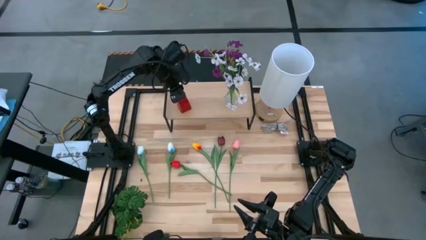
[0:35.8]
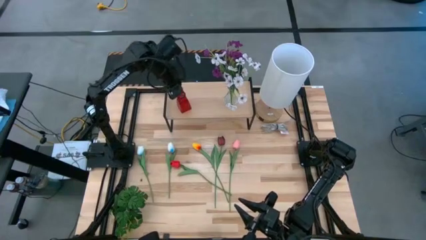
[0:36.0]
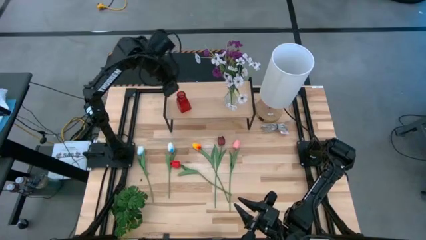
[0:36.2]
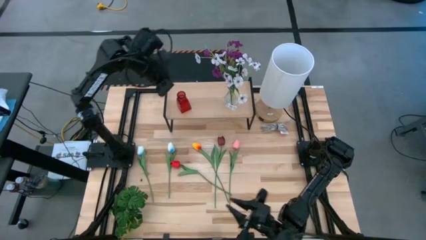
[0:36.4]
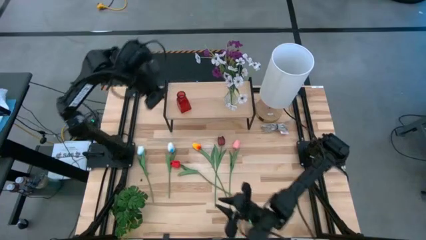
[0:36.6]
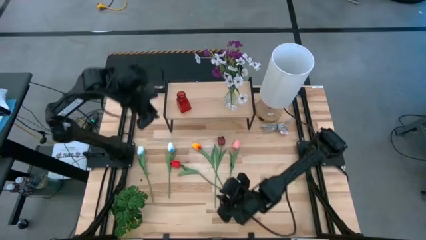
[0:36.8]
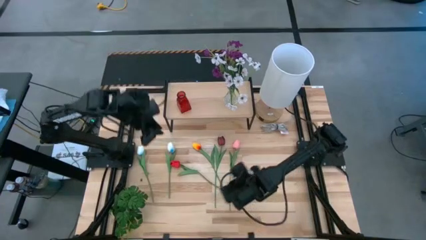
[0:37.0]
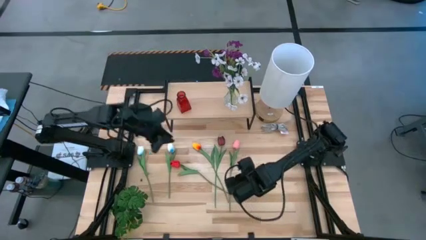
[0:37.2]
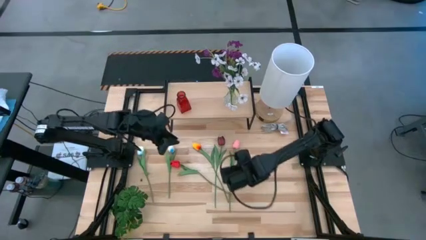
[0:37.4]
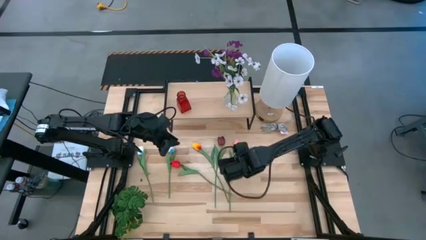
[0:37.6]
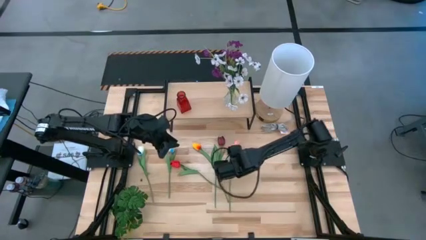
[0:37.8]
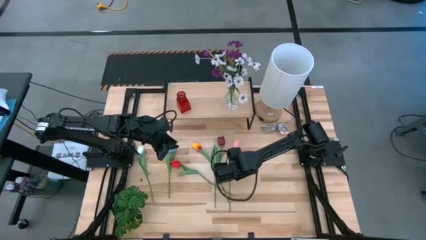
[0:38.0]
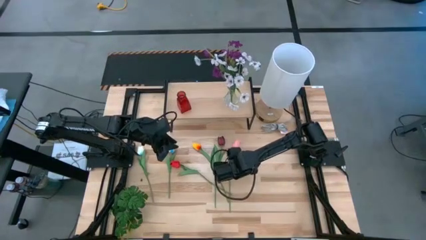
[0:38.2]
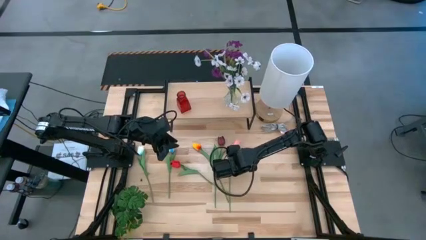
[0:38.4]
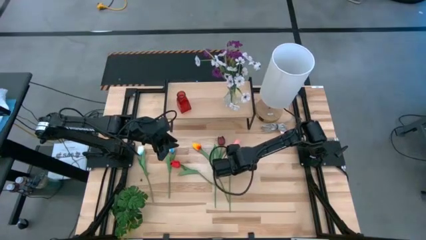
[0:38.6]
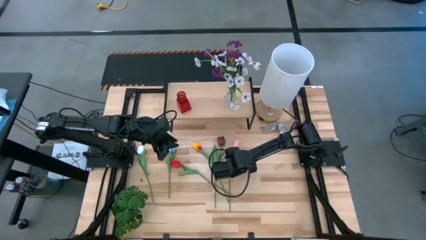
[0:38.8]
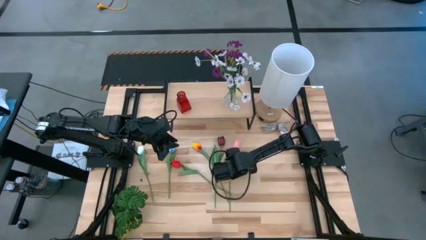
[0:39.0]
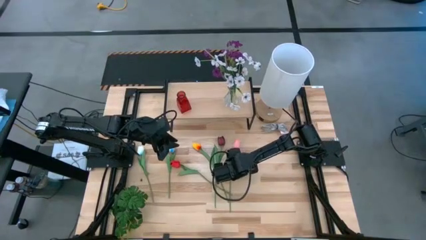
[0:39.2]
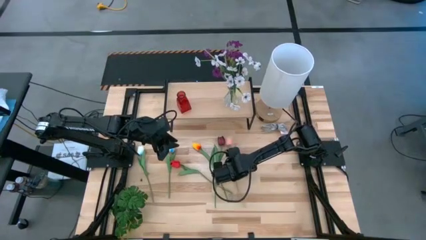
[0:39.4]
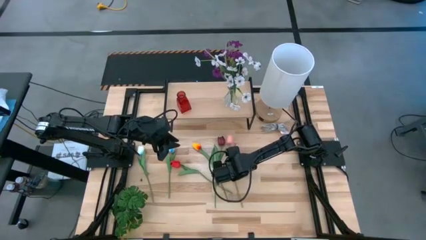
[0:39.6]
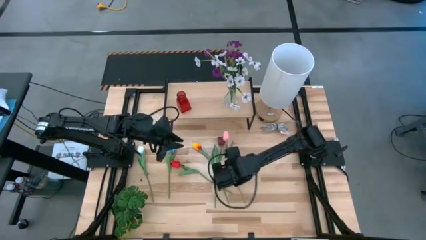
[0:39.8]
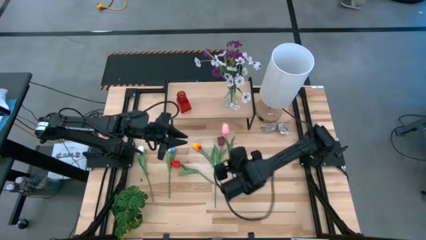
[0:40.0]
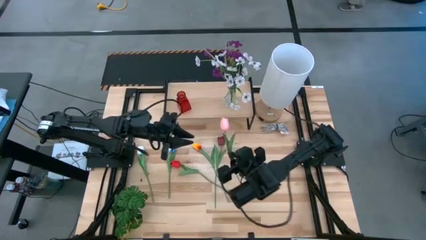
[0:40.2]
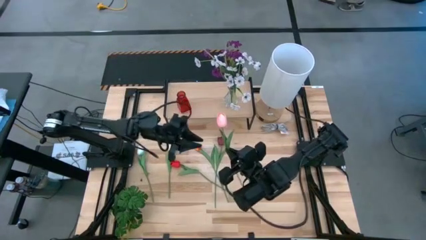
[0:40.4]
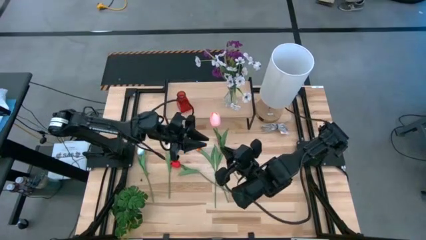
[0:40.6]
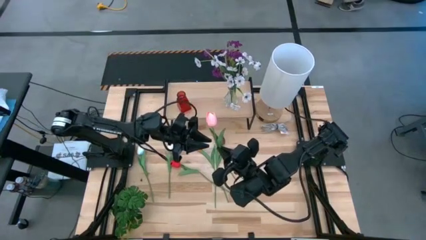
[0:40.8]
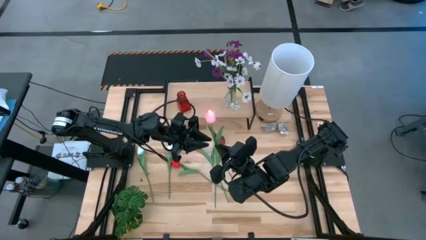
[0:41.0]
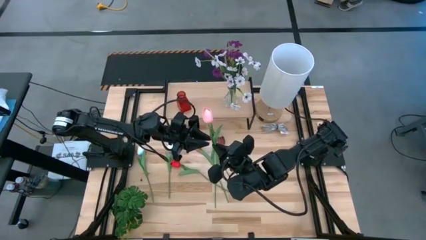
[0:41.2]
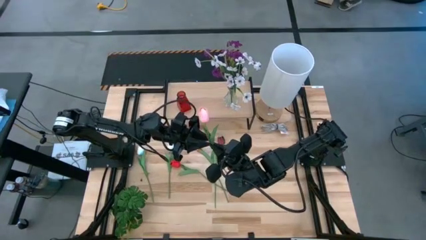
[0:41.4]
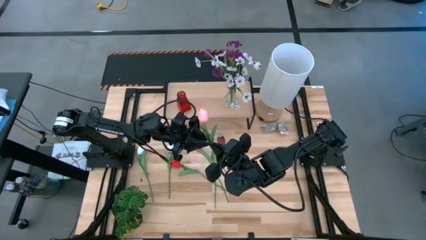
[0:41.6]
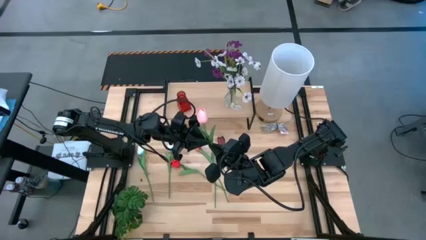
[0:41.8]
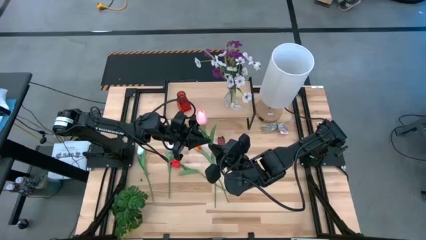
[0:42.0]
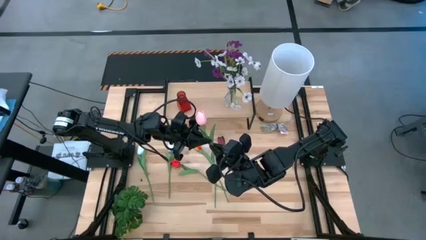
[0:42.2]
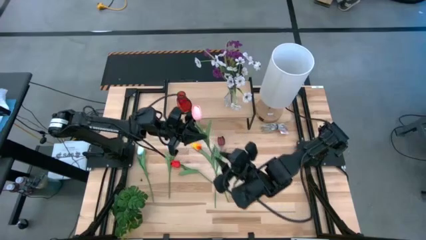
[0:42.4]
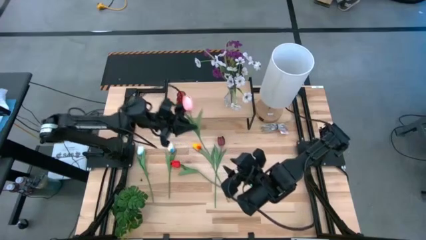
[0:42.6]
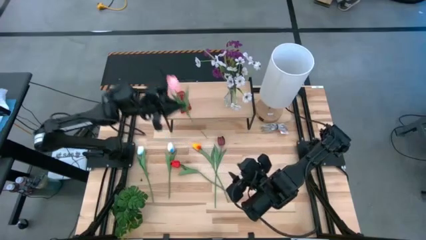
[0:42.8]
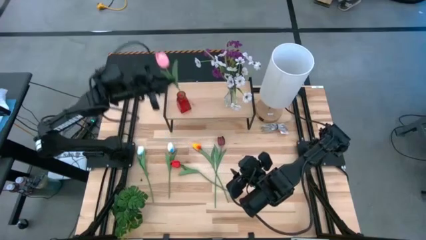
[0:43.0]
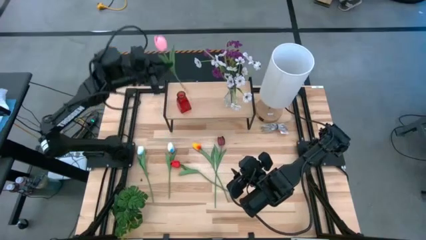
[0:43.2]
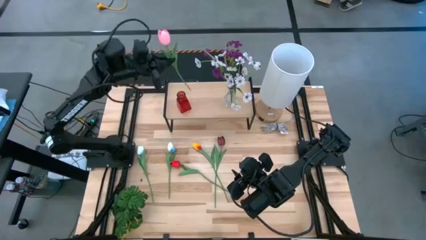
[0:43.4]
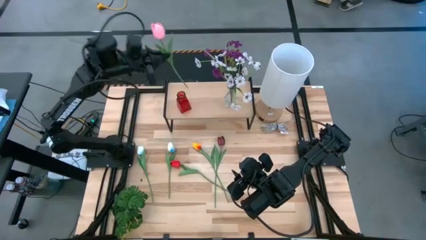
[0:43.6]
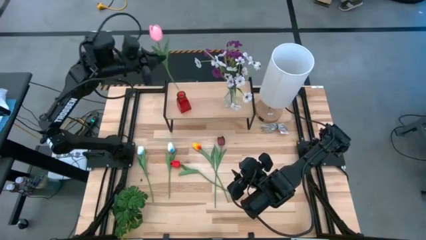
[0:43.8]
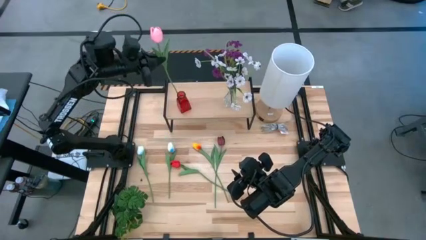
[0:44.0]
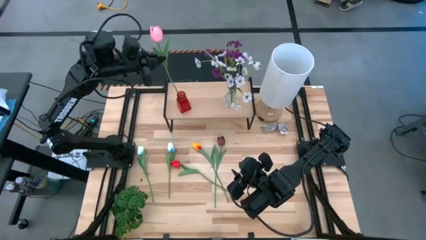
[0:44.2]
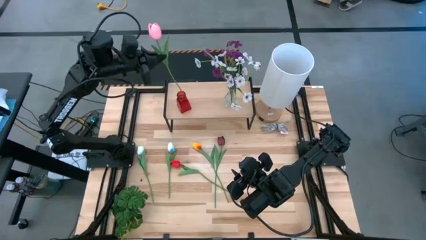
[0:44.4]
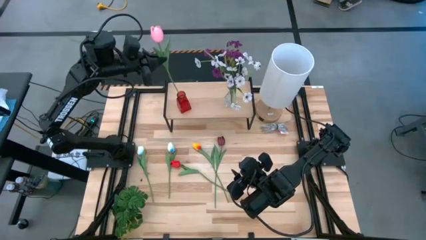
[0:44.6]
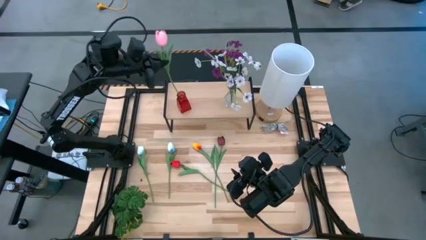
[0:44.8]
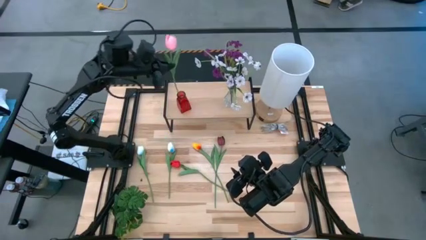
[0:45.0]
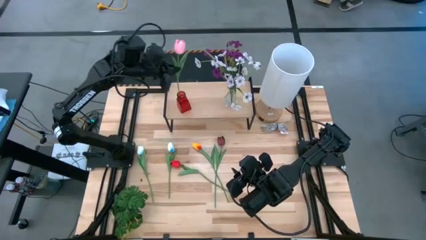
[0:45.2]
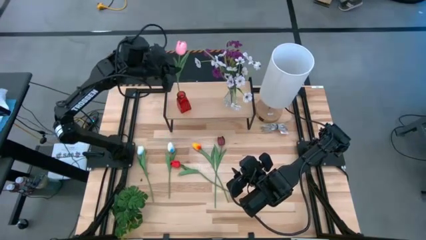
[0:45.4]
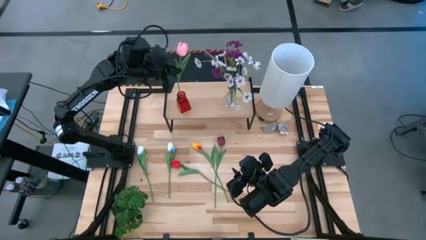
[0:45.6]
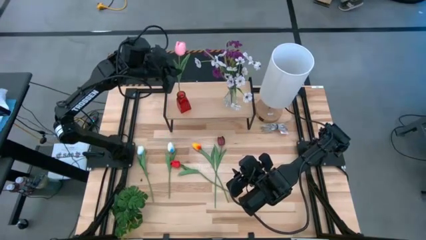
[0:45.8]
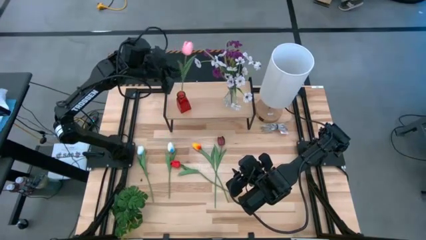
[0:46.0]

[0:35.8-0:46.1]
Task: Pick and place flowers into a vace then onto a shelf
Put the pink flower into the red vase on the shelf

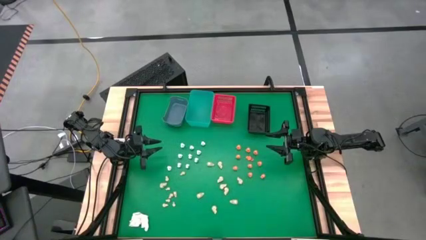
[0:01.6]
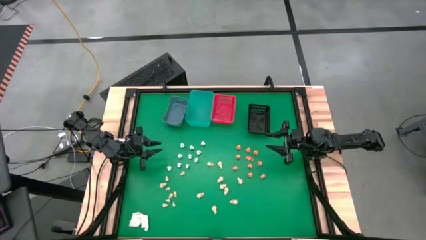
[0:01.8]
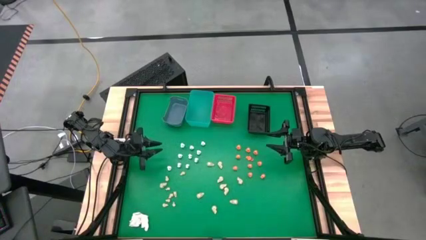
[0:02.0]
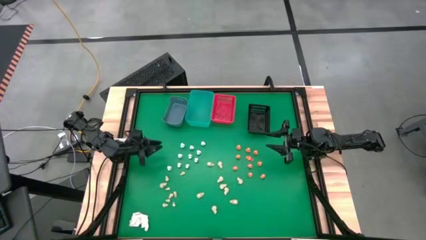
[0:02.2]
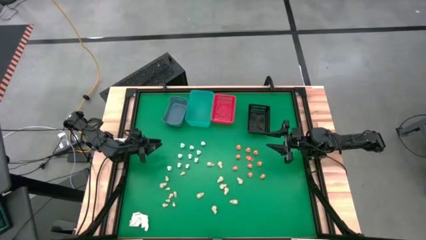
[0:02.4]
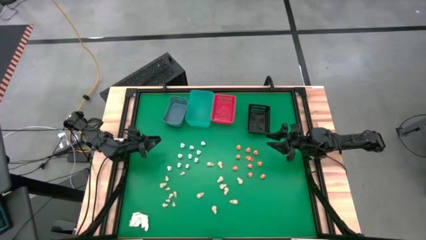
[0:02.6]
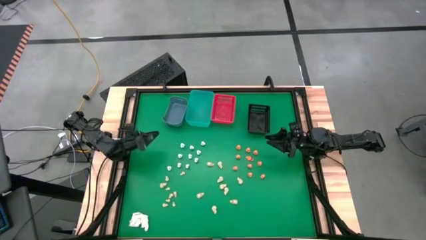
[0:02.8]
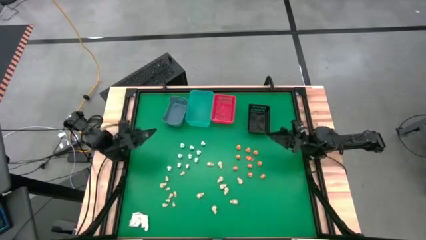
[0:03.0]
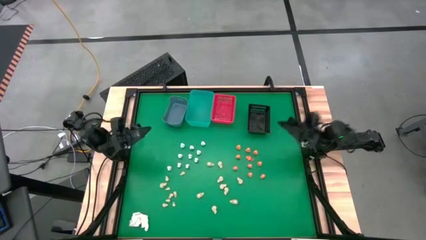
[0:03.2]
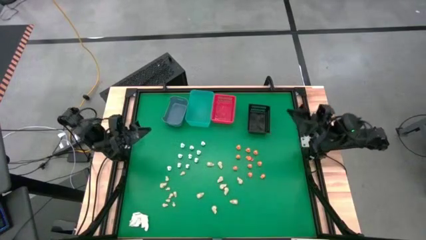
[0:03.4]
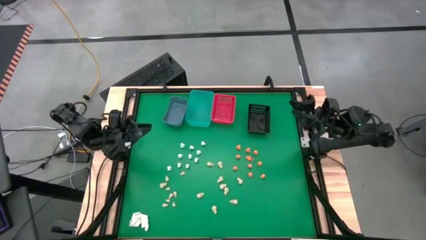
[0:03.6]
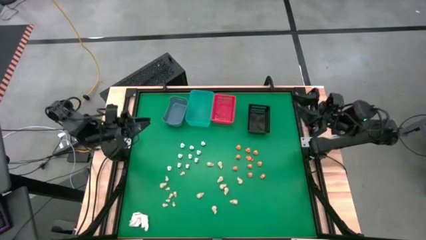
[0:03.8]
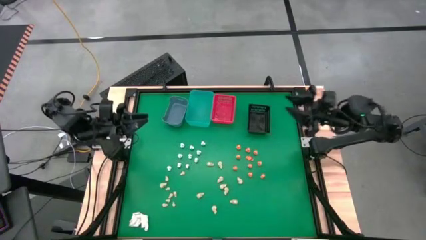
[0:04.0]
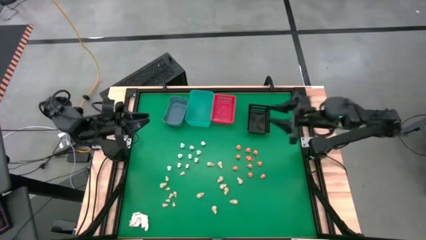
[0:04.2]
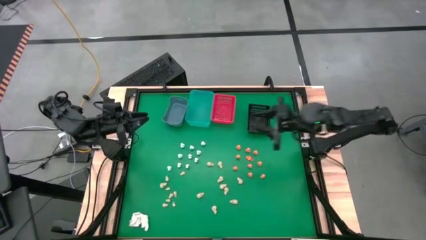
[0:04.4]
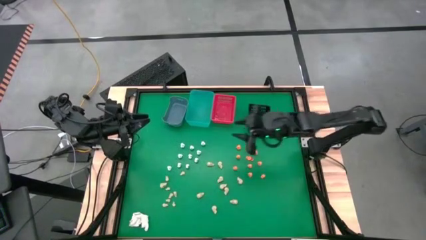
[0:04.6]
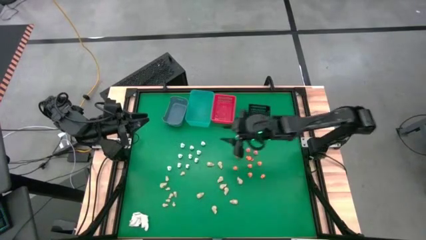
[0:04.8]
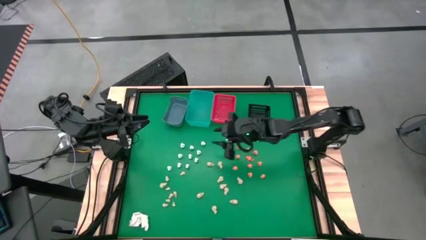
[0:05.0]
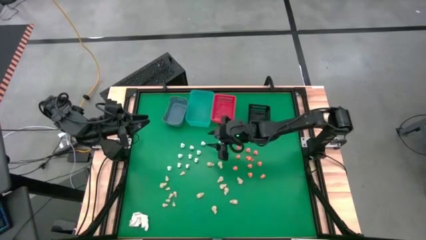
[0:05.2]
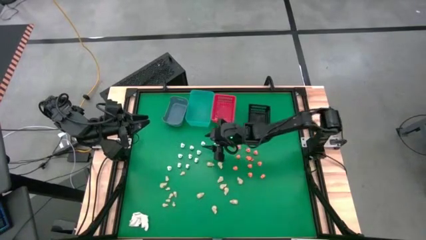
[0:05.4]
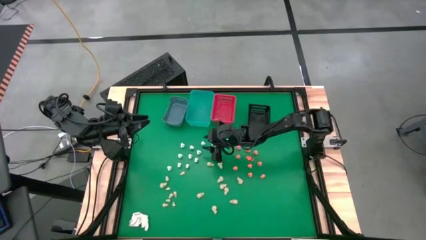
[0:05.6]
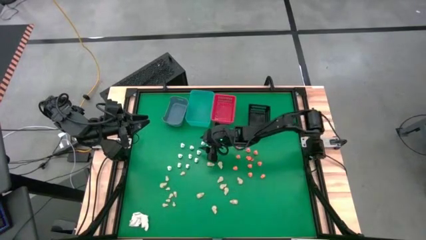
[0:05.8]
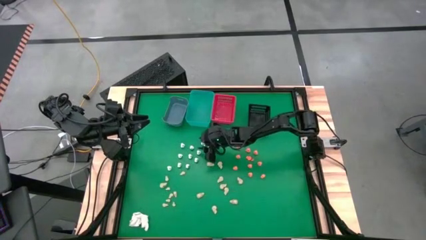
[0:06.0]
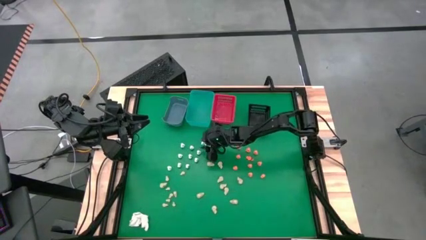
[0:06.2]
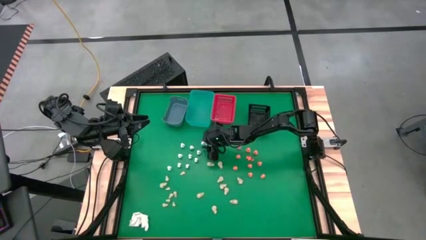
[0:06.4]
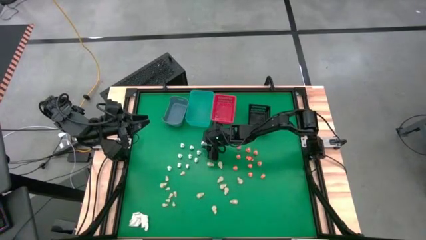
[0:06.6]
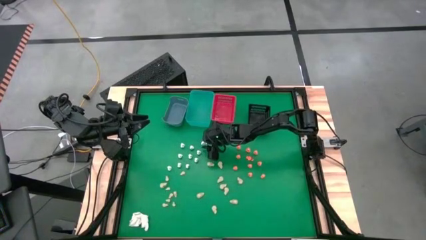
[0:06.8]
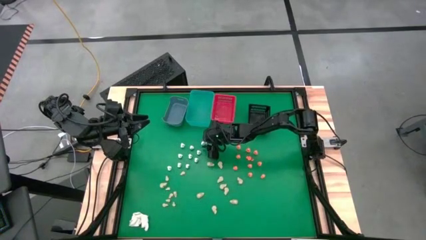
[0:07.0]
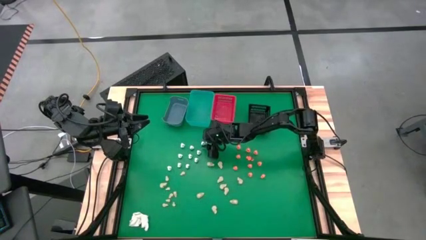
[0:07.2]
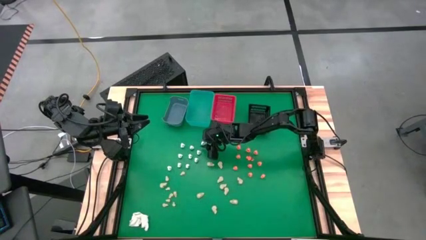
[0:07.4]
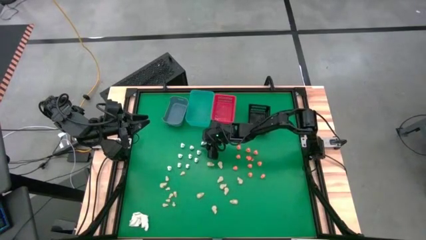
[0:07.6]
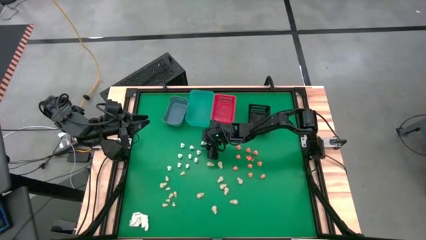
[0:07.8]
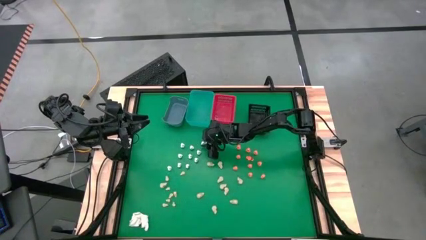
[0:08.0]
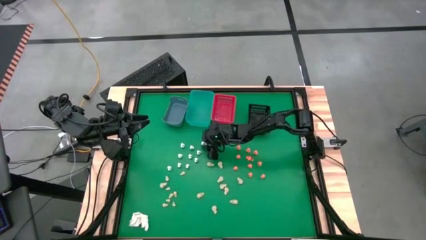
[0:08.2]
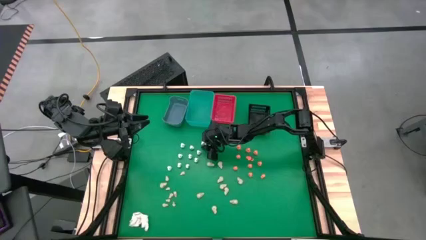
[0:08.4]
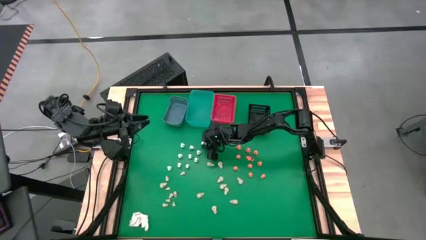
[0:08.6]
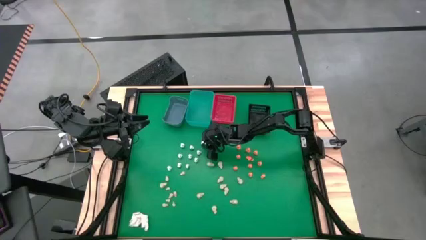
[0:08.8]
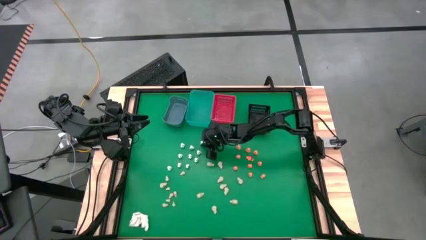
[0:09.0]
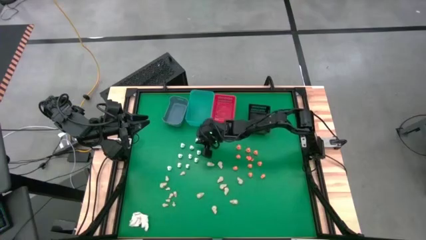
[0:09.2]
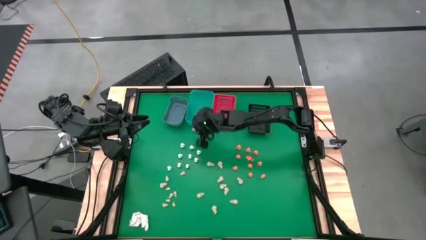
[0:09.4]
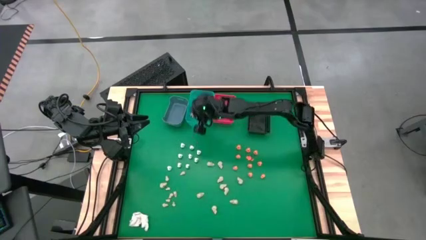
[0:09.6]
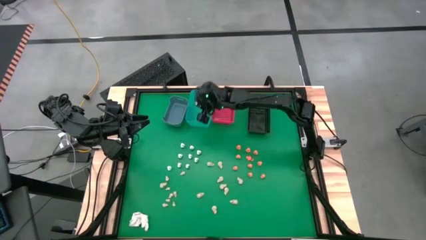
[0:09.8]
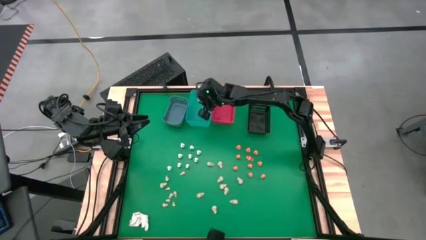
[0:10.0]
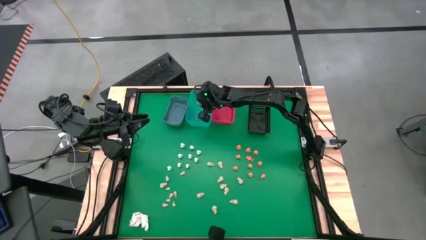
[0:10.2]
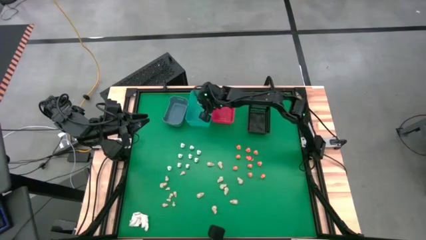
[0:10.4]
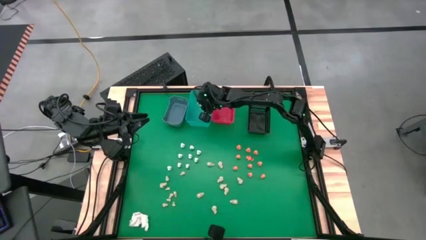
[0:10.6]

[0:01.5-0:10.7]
Task: Sort Halloween decoration
Put the white skeleton toy into the light blue bin
